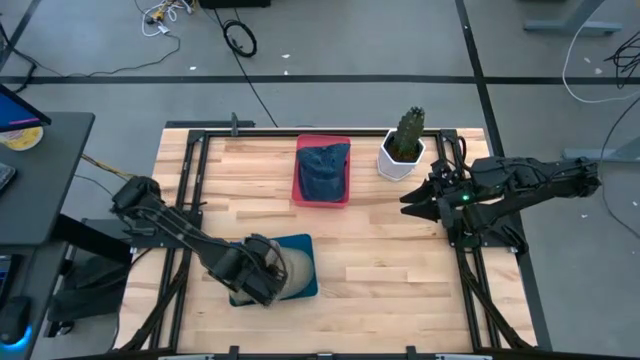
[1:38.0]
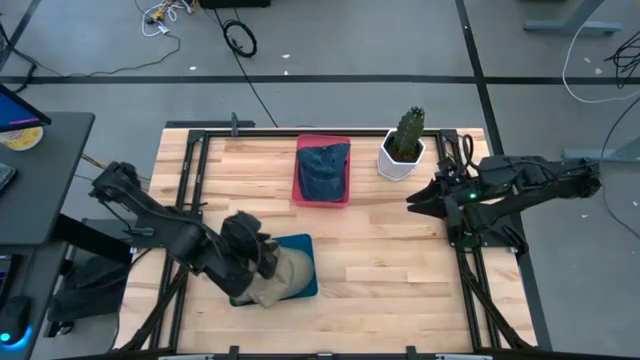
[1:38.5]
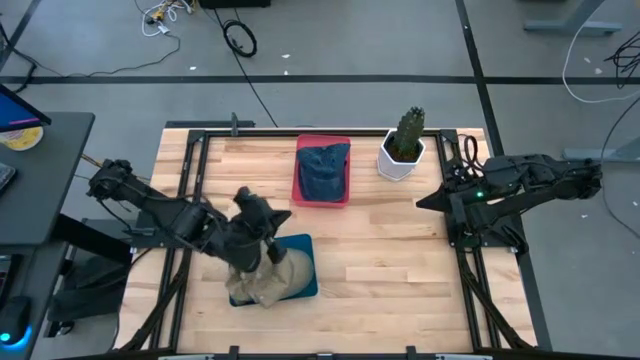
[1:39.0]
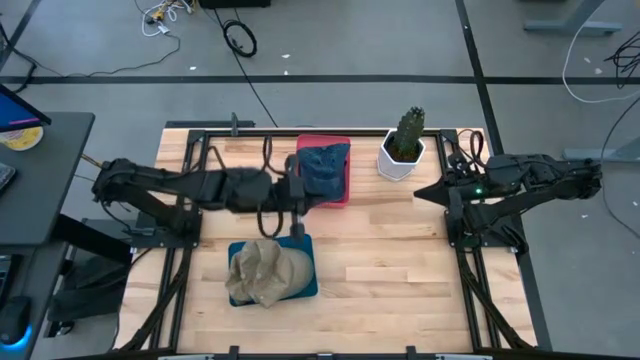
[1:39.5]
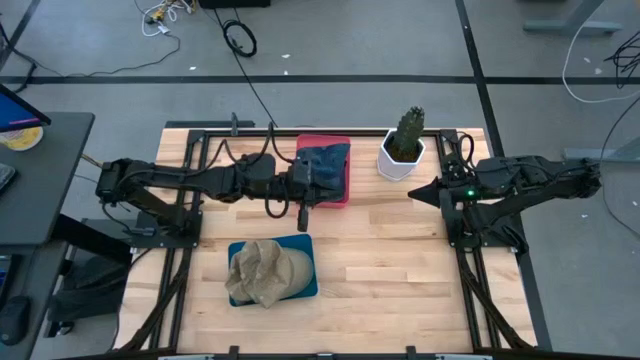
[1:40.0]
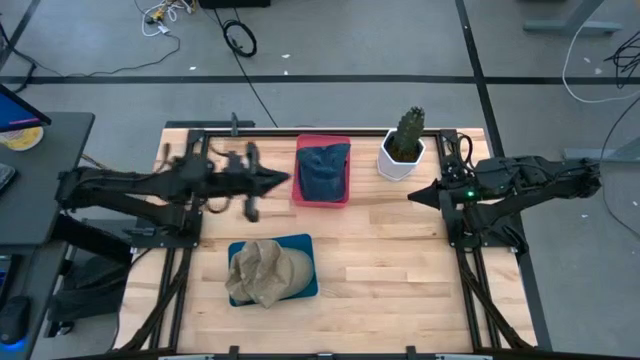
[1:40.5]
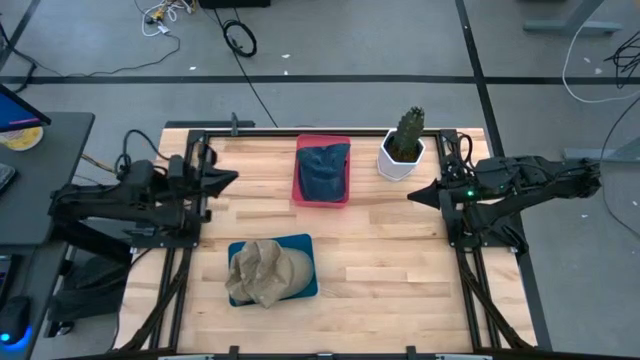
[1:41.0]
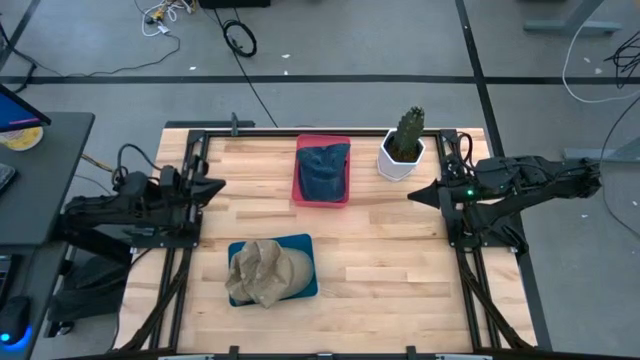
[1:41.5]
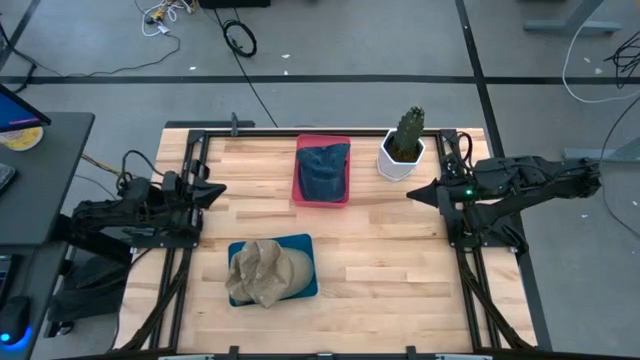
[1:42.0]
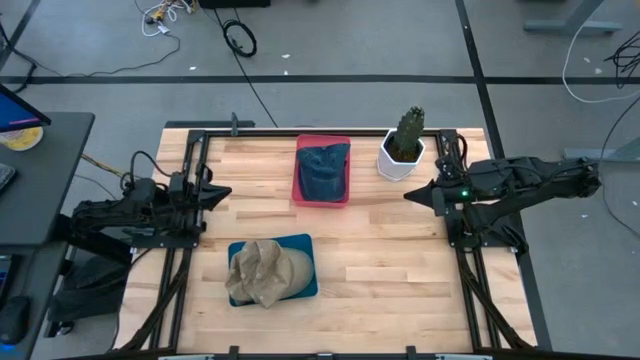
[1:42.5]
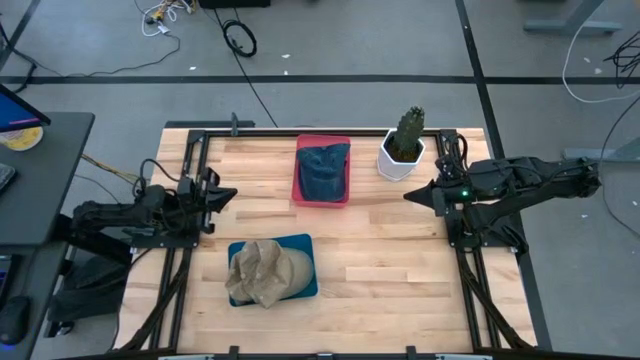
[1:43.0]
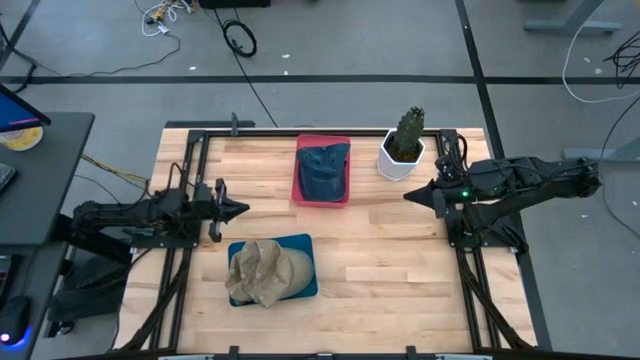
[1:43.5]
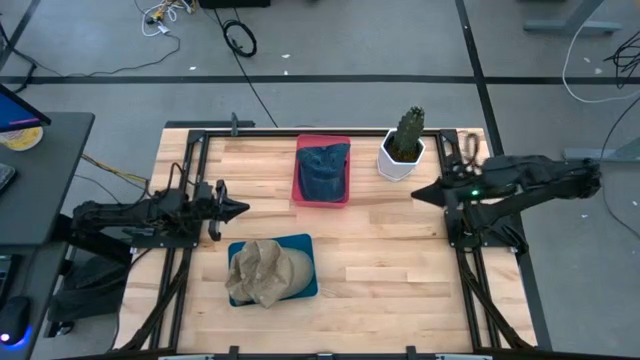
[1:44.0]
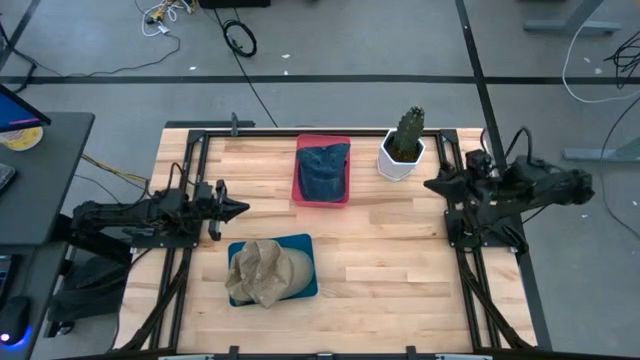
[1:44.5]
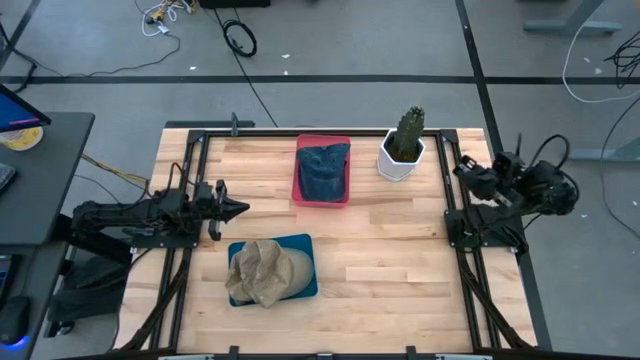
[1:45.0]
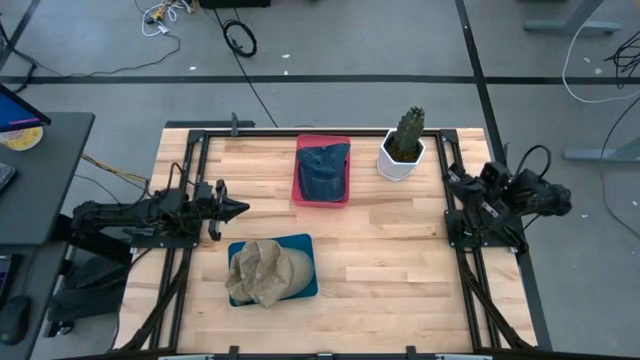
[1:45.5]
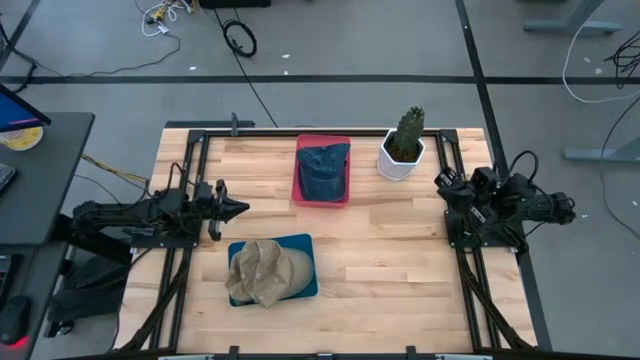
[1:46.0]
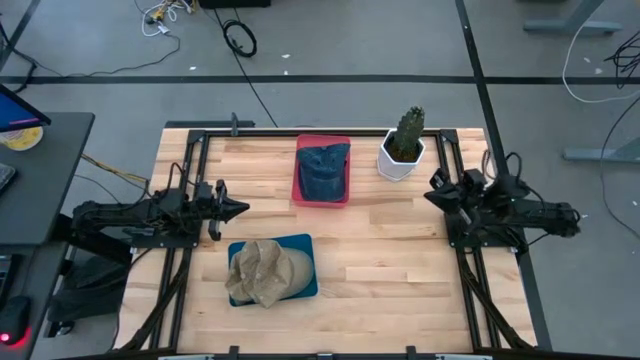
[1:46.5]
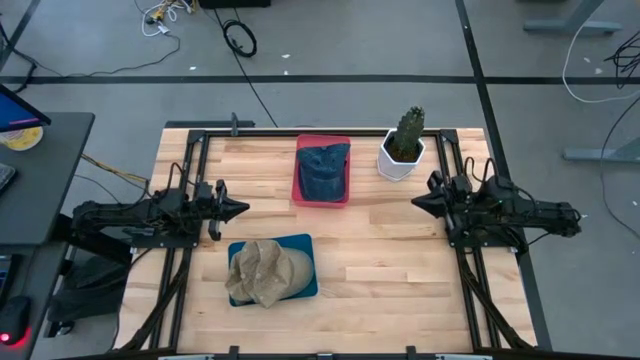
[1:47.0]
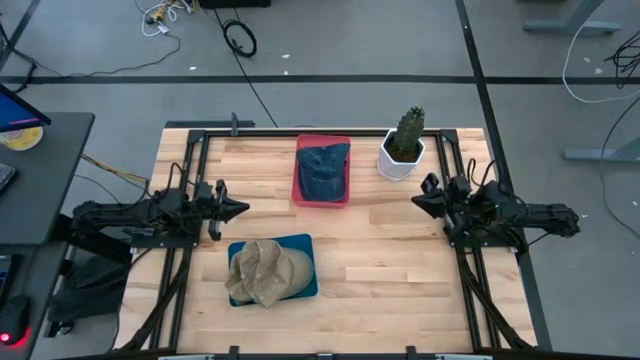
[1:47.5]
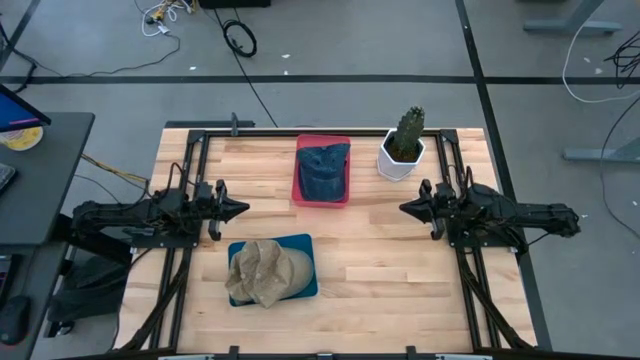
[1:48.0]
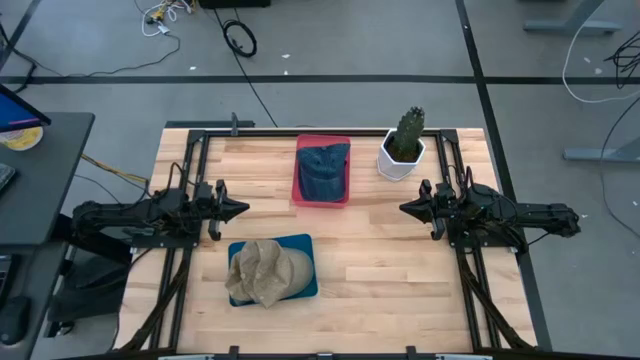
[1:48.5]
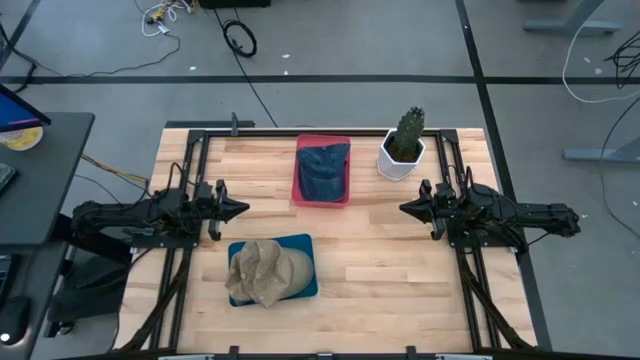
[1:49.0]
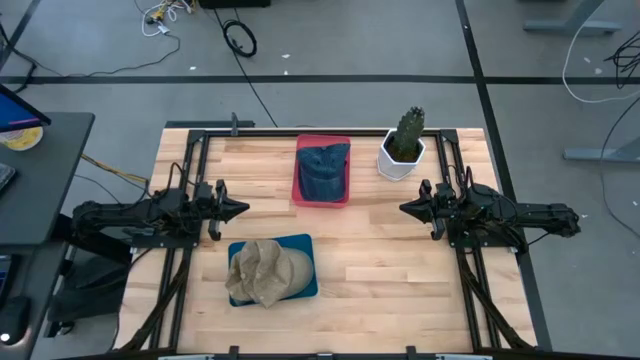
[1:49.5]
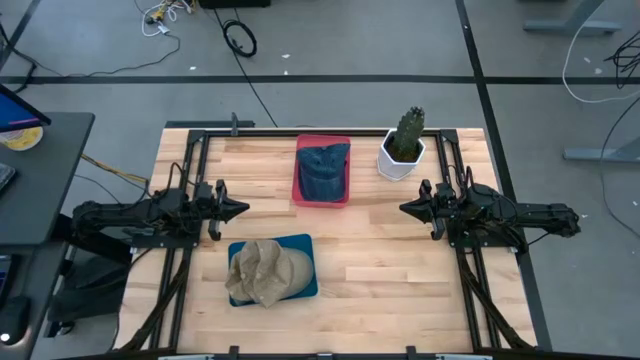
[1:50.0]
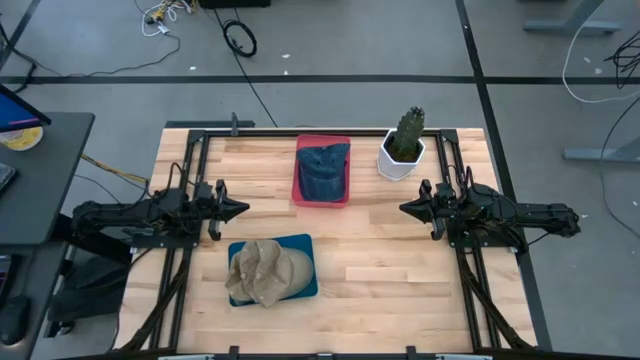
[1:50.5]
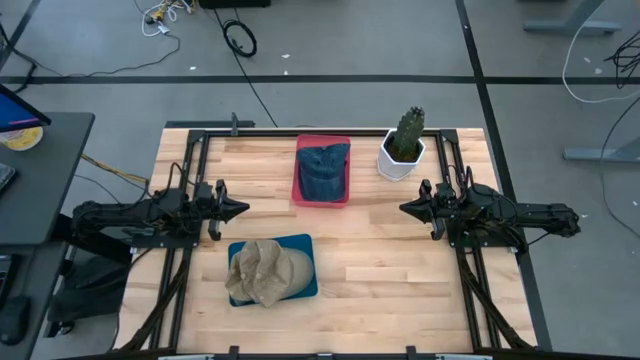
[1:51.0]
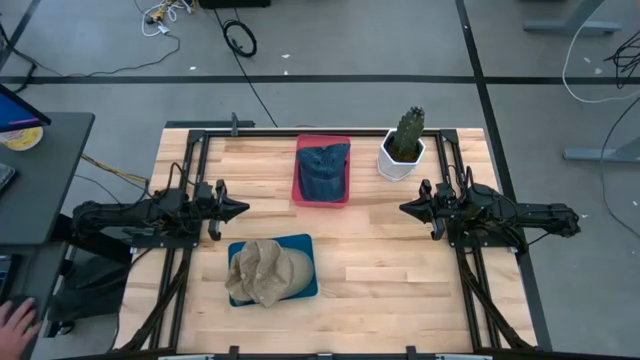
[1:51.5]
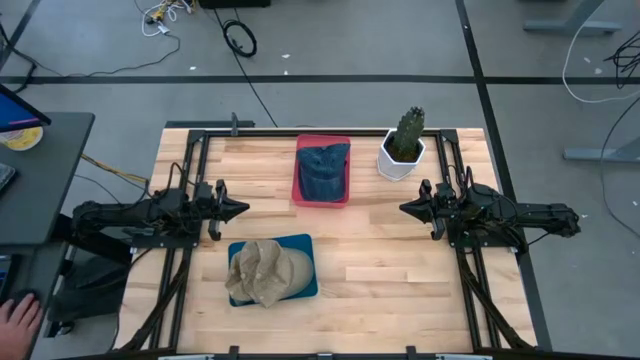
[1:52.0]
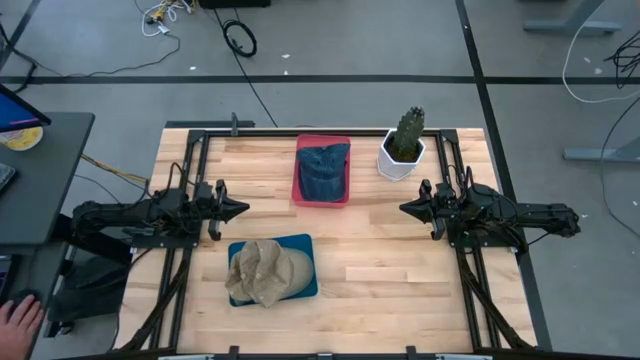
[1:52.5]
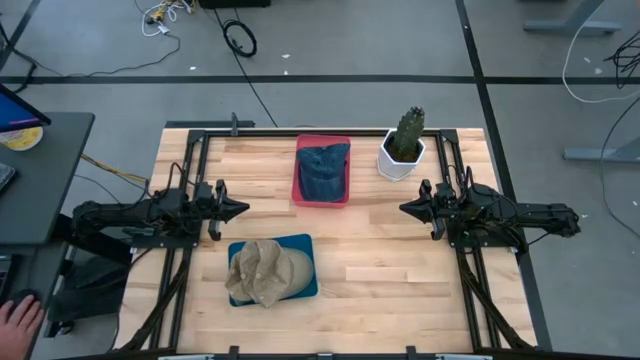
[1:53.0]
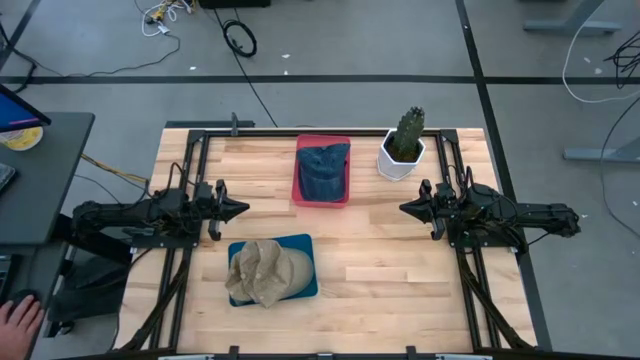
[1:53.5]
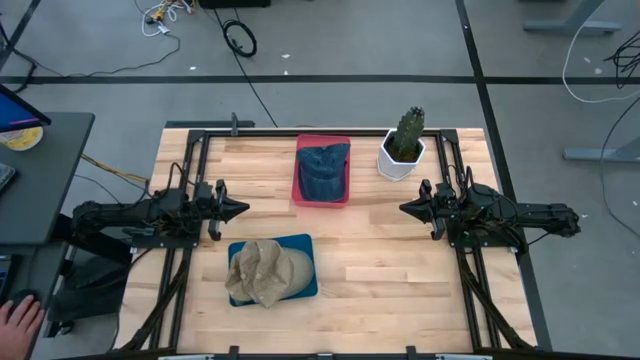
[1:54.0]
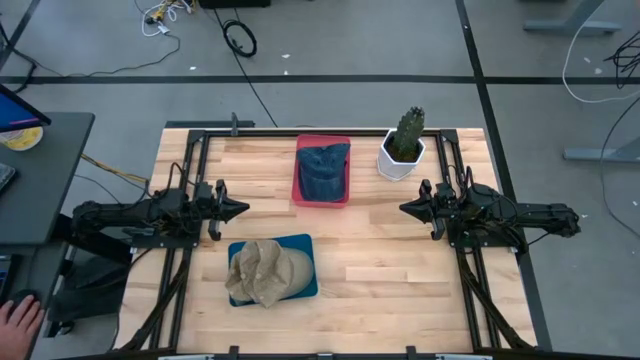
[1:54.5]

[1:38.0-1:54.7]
Task: Pick & Place hat
Return to Home Position
